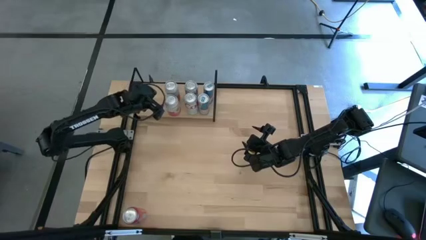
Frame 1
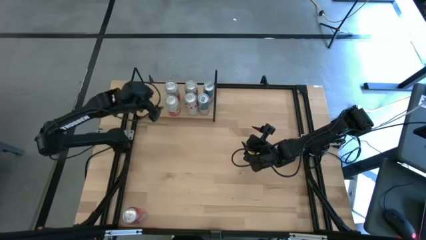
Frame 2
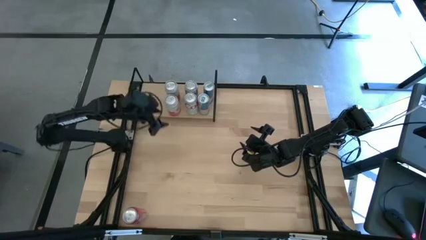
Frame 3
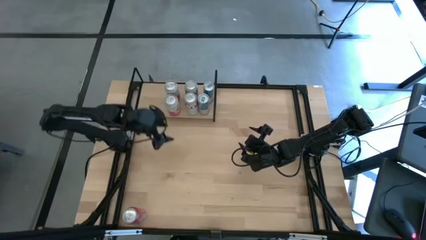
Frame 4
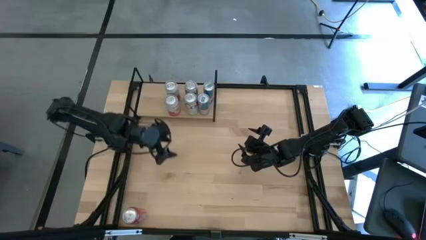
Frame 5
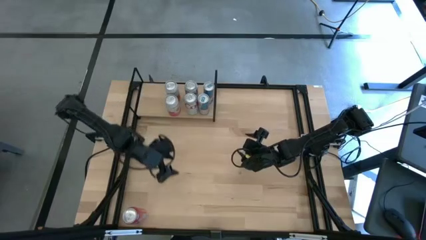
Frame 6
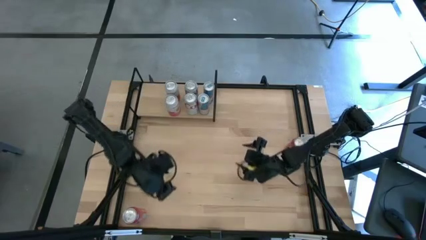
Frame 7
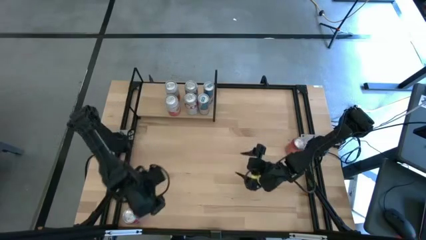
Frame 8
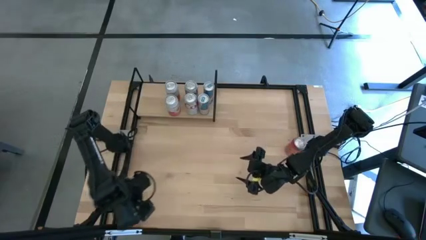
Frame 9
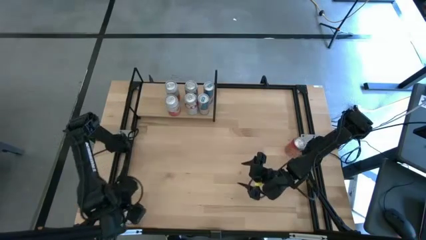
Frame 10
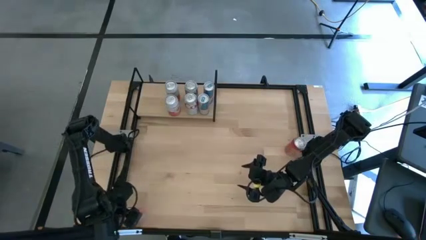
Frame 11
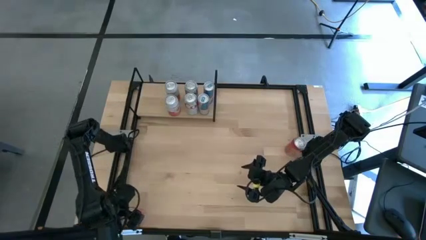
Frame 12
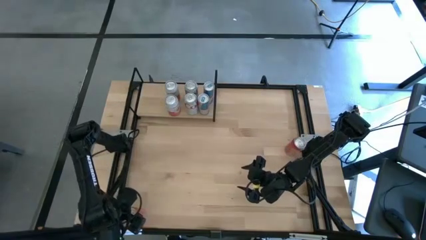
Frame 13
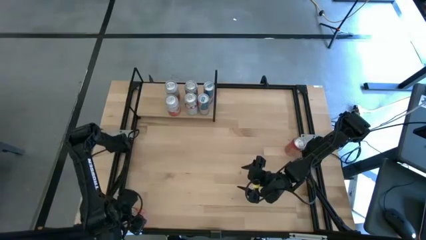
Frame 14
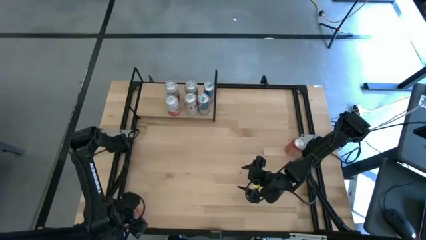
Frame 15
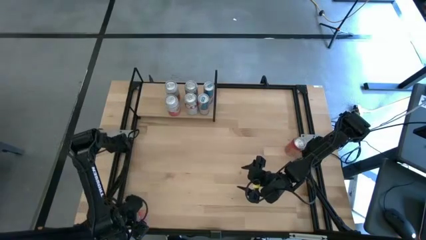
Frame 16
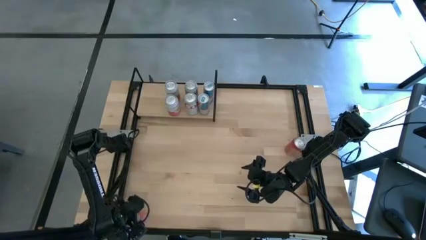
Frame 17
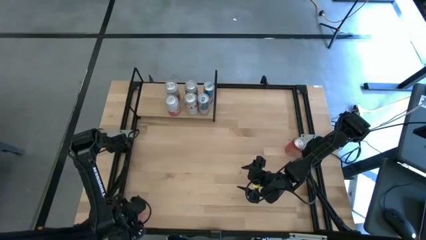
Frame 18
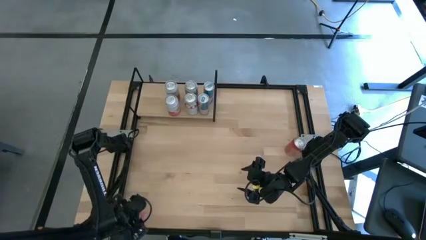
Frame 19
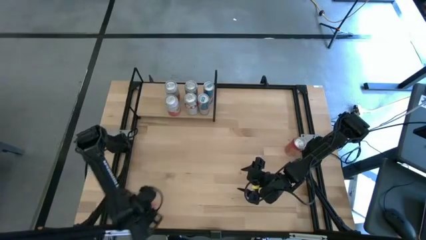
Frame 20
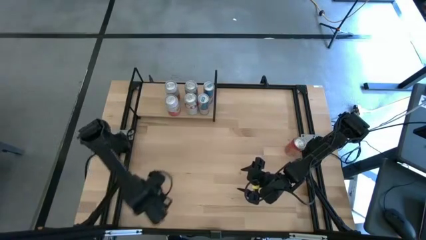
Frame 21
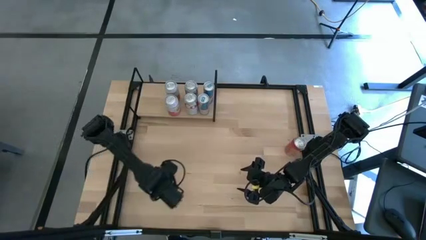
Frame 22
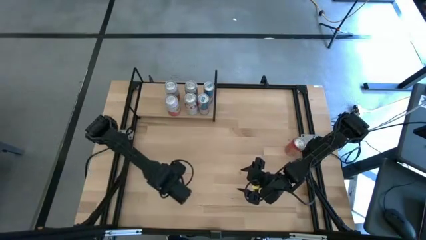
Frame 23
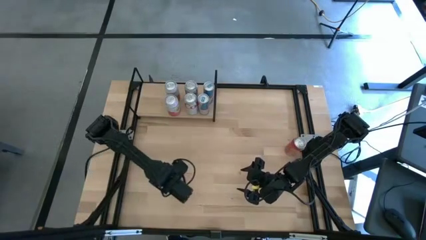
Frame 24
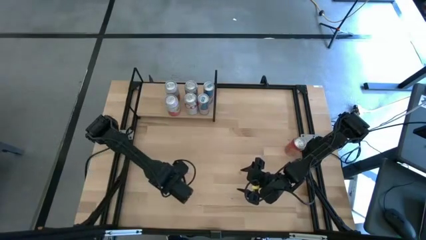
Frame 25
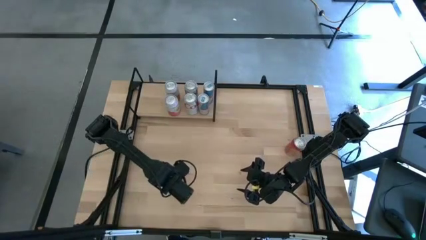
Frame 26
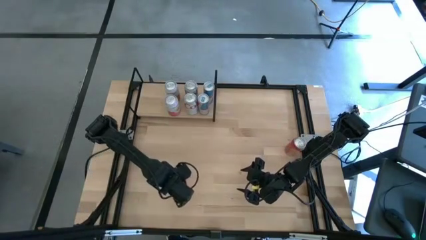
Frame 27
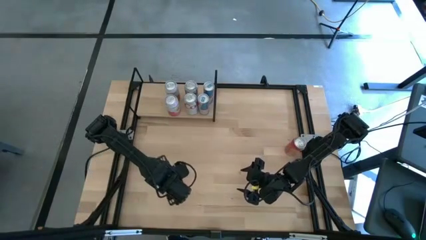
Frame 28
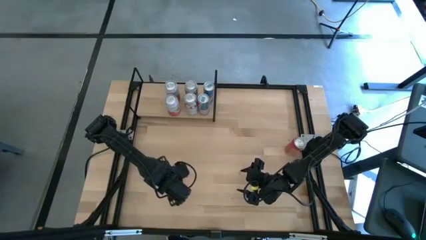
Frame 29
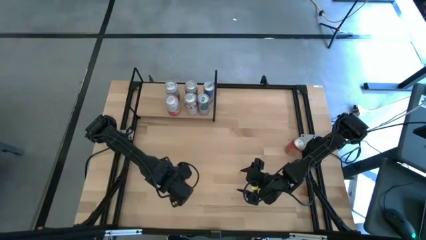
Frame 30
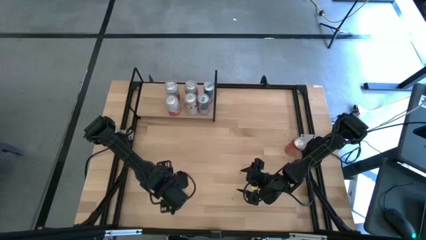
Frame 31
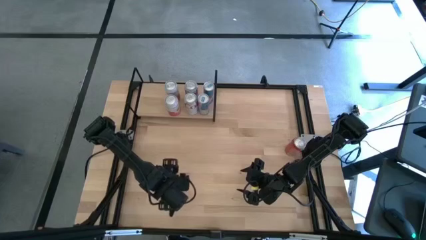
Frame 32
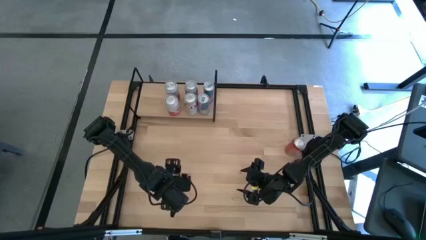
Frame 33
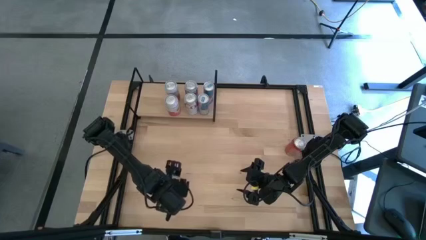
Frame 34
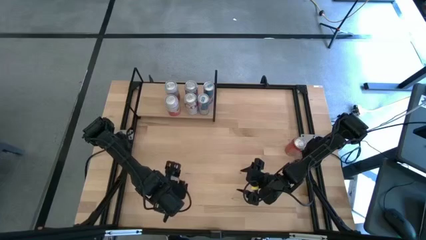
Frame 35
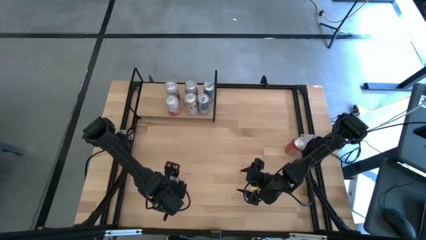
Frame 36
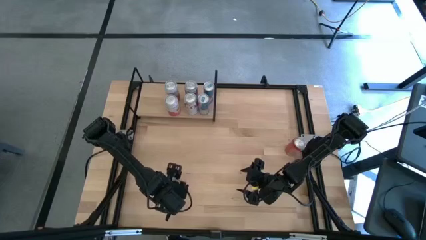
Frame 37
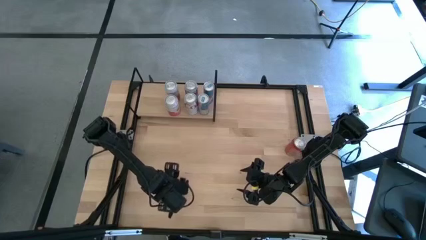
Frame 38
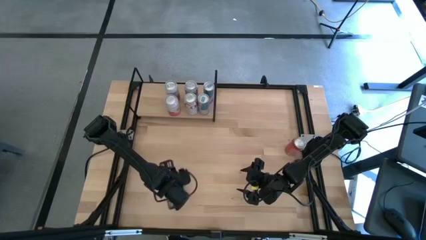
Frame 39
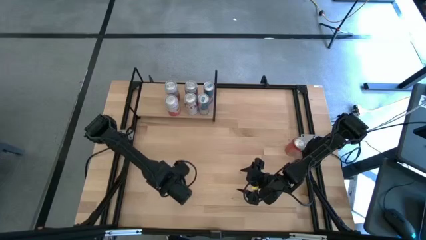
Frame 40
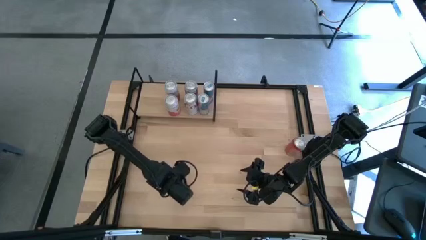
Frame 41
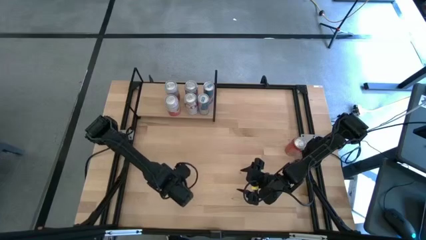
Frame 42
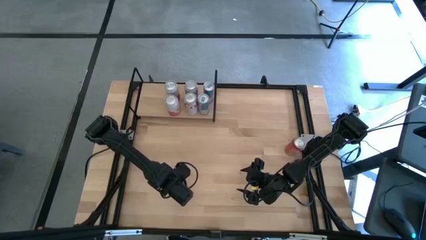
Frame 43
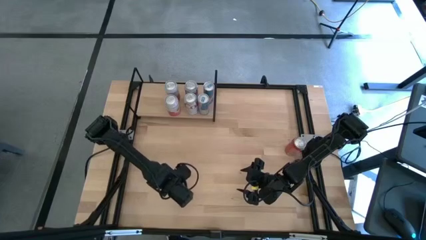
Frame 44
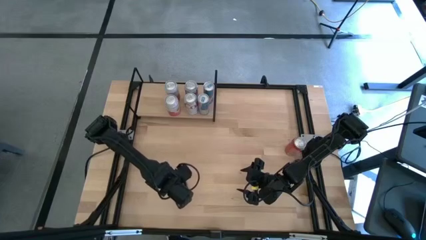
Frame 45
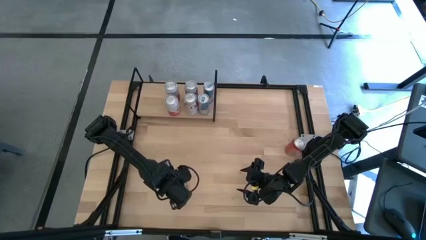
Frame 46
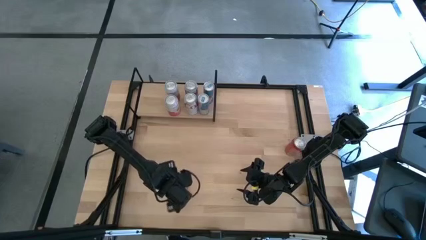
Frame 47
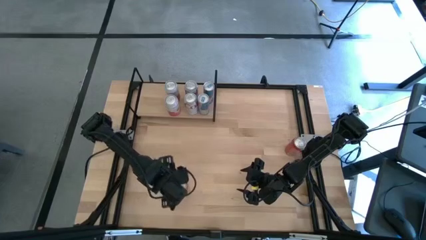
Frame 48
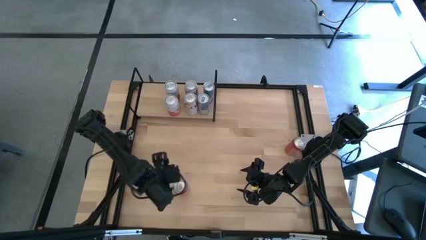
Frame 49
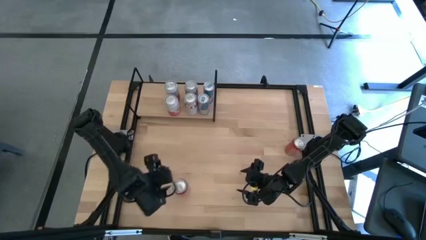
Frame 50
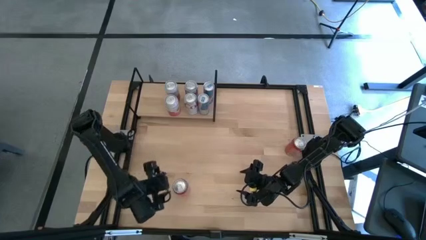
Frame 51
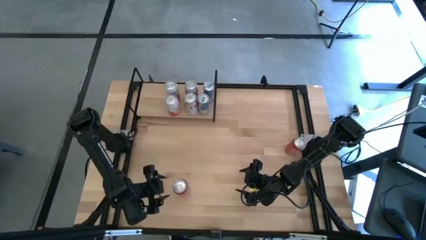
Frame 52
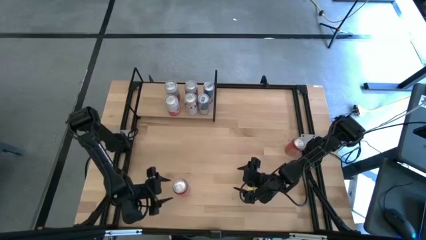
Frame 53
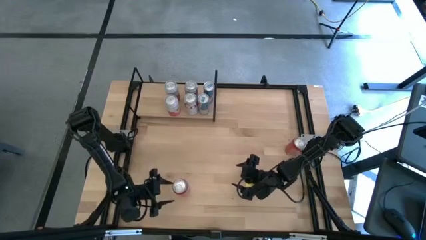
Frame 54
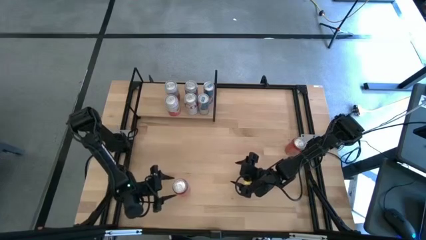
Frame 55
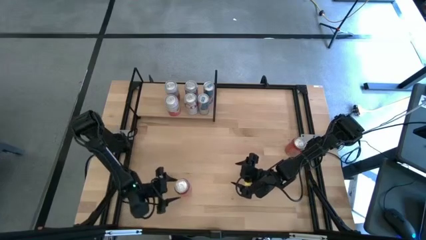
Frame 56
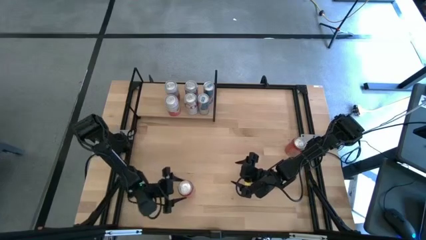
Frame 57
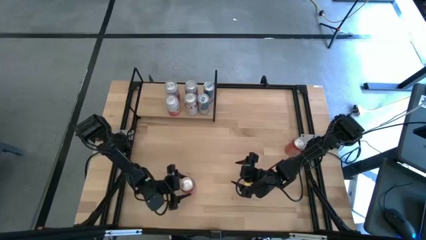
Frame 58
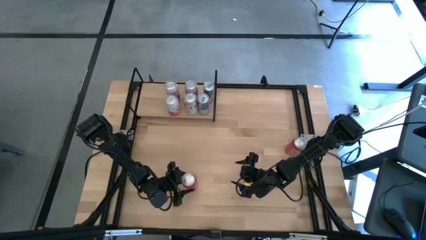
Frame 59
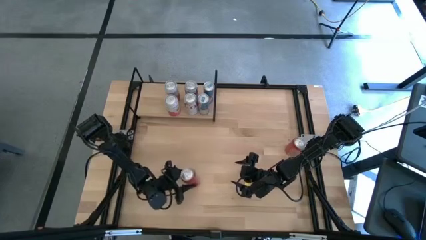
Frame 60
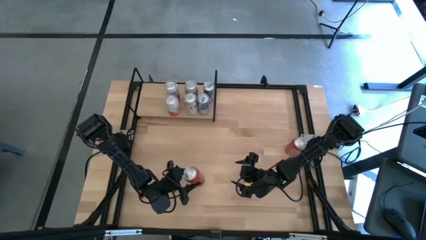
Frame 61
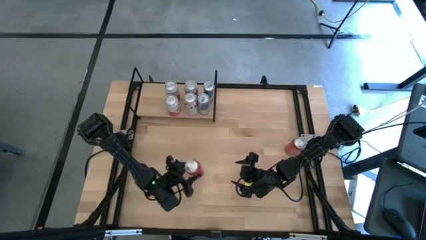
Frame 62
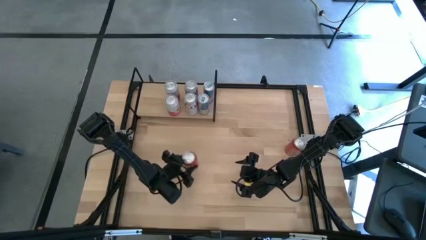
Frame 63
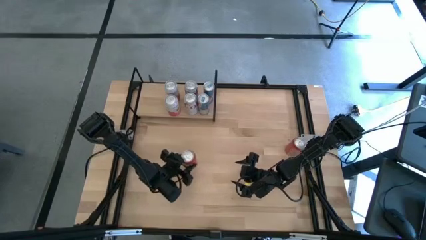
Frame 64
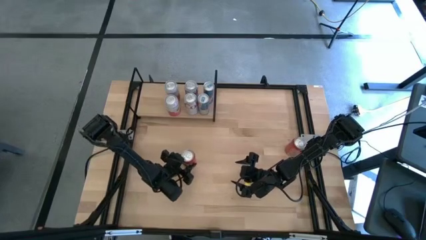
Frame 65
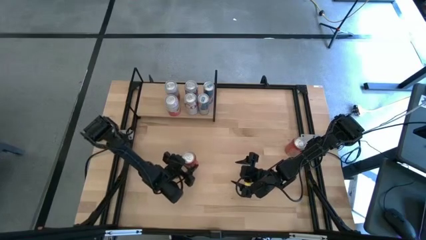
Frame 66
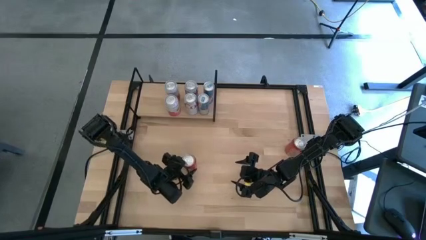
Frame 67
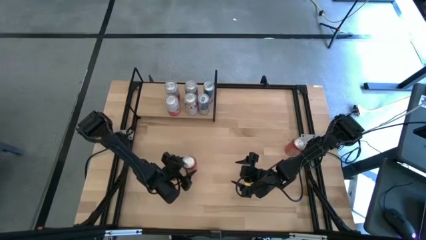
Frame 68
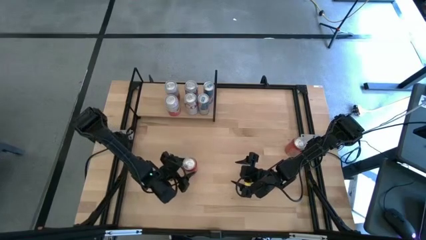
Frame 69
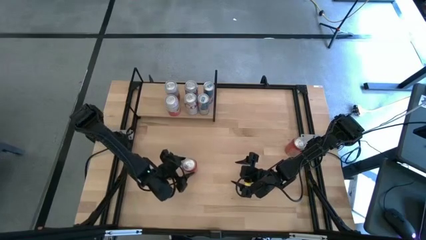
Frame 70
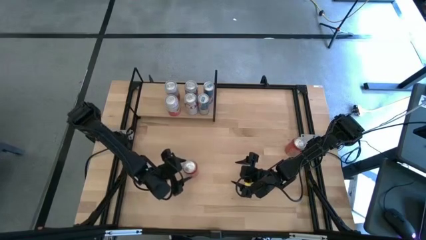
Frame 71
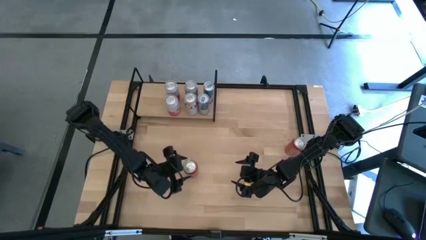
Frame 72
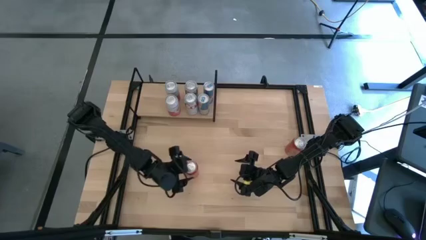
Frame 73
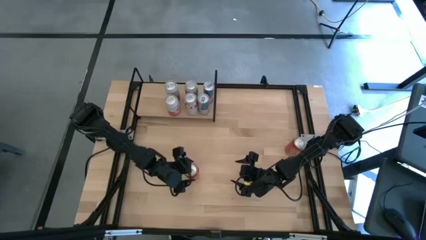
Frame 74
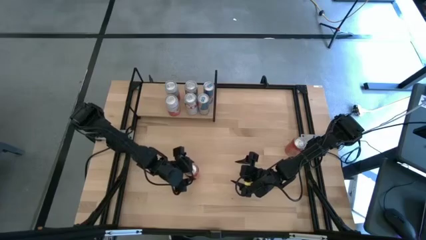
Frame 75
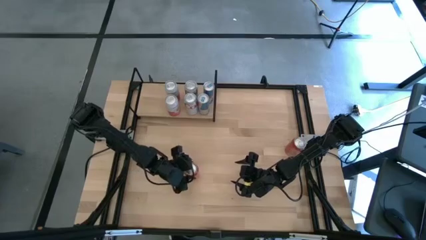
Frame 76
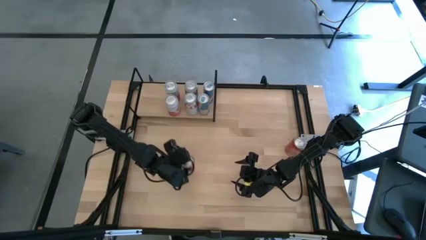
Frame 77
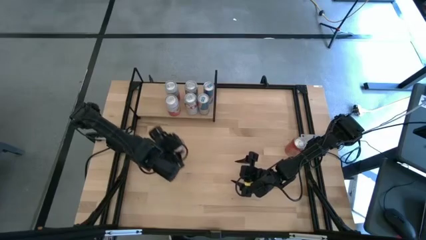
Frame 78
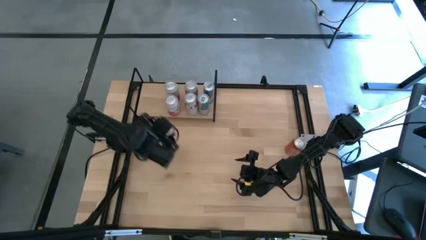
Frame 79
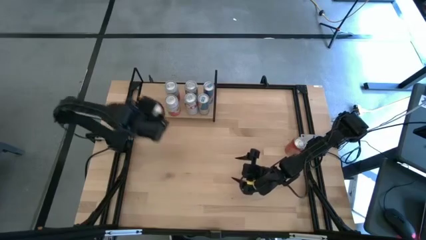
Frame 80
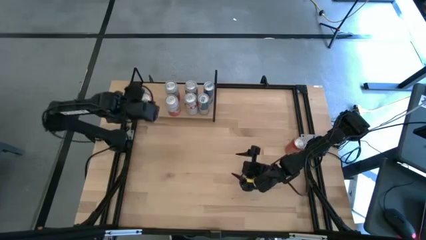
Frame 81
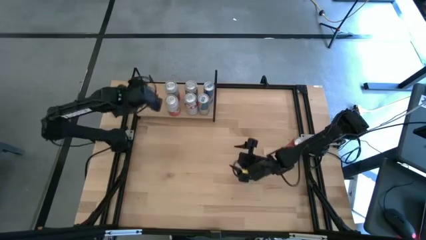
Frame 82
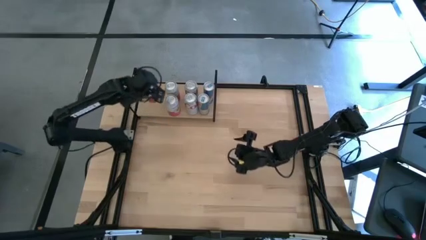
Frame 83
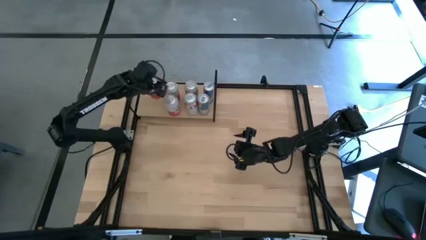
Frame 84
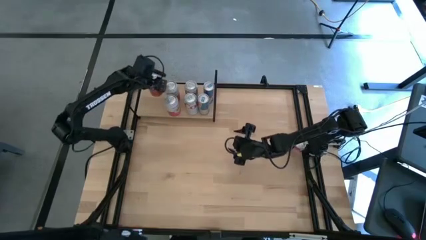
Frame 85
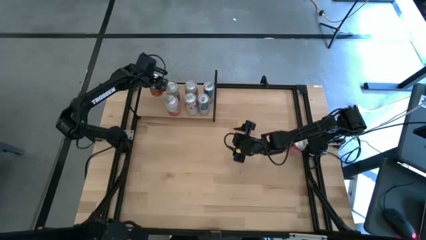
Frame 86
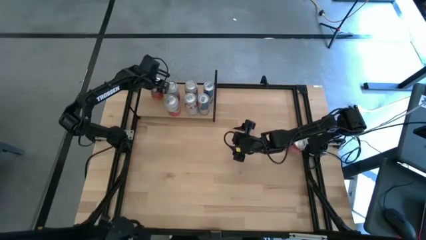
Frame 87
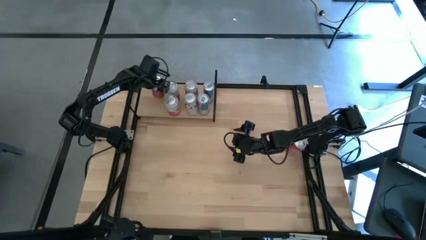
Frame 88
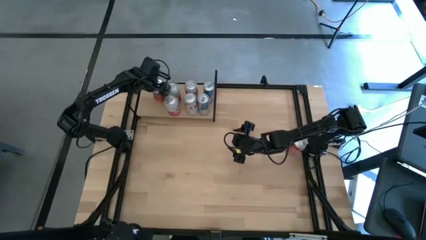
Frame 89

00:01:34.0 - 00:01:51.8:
Task: Place canned beverage on shelf
Put the bottom red soda can on the shelf
